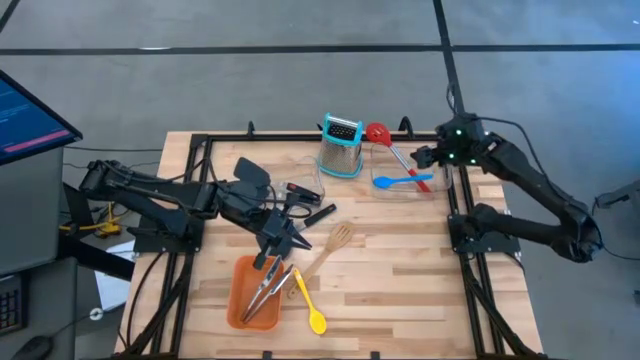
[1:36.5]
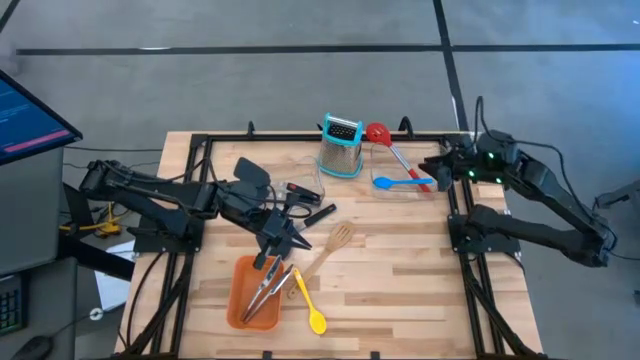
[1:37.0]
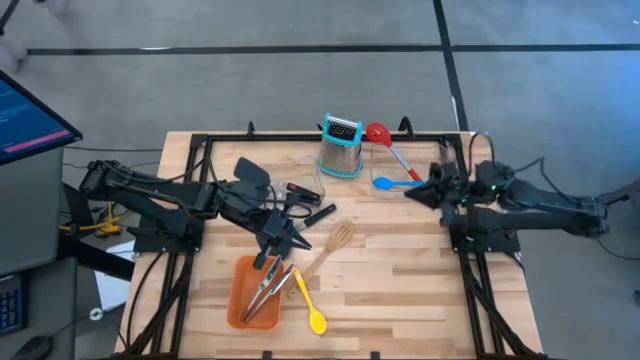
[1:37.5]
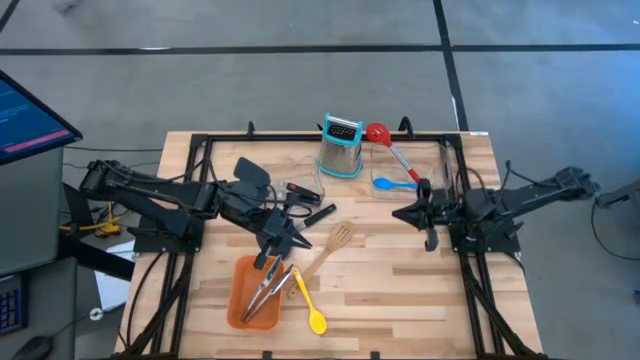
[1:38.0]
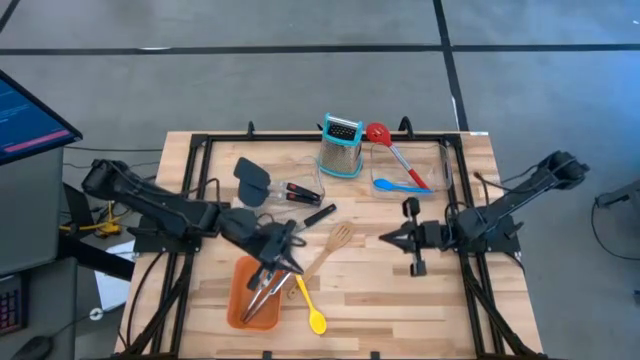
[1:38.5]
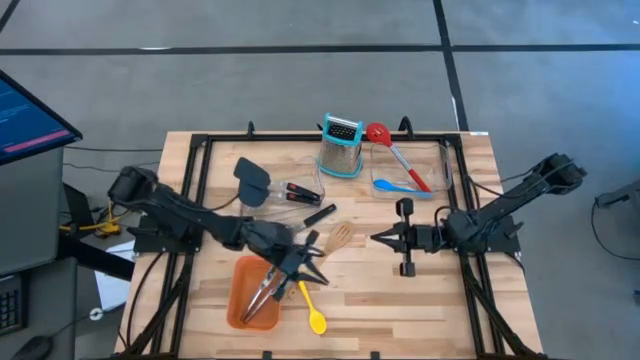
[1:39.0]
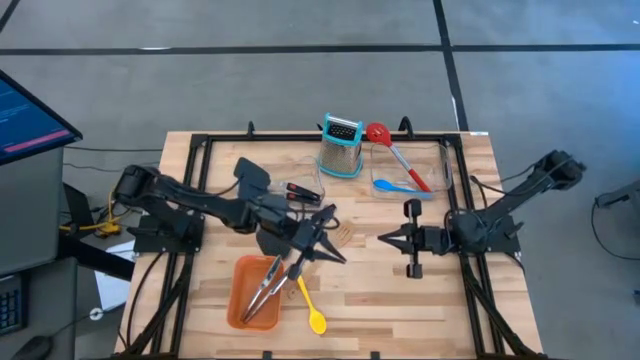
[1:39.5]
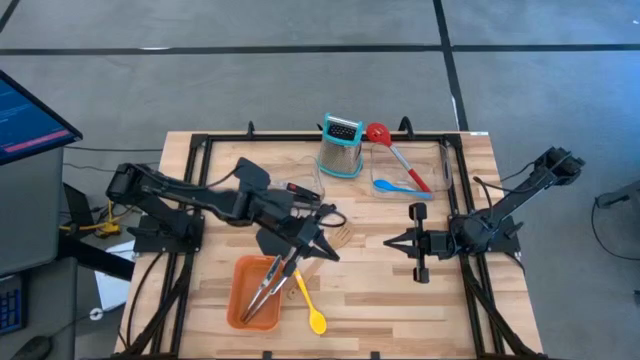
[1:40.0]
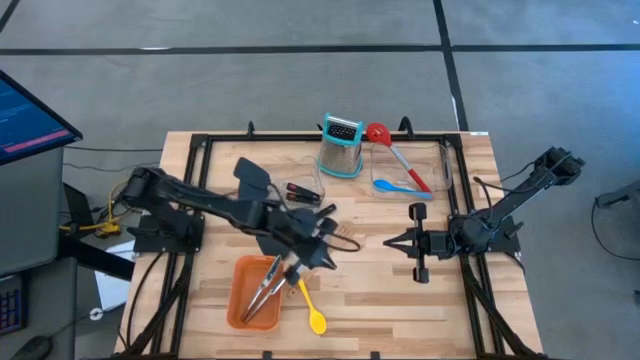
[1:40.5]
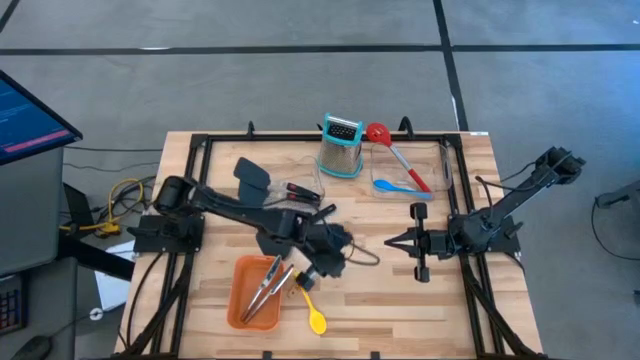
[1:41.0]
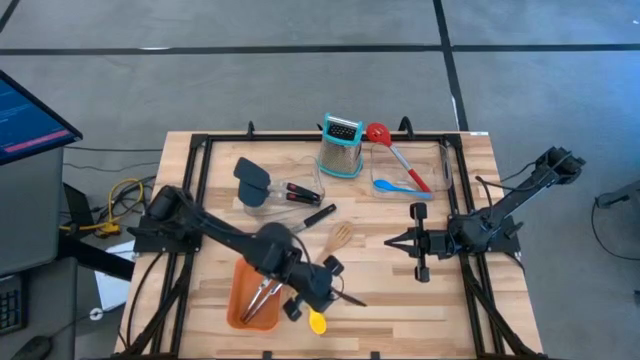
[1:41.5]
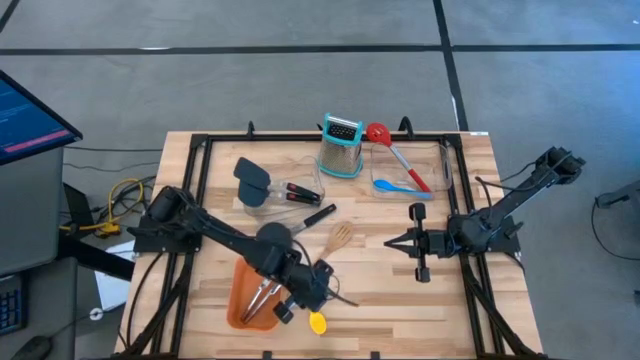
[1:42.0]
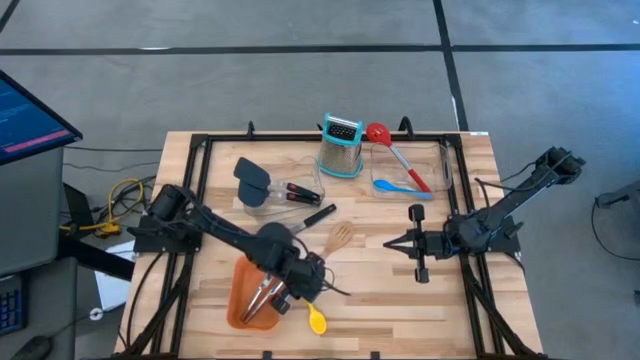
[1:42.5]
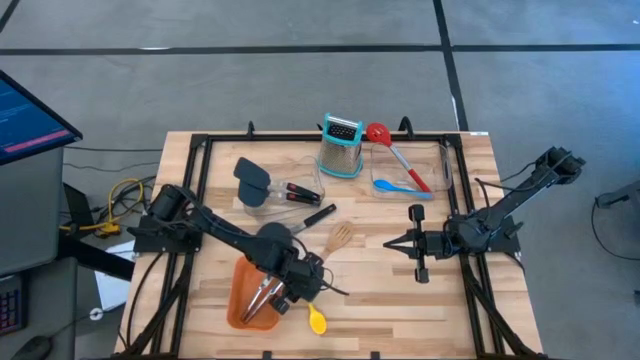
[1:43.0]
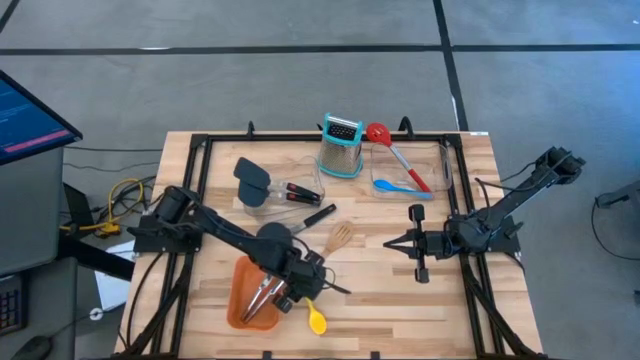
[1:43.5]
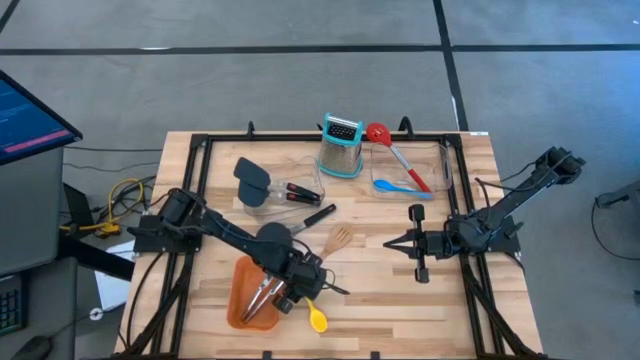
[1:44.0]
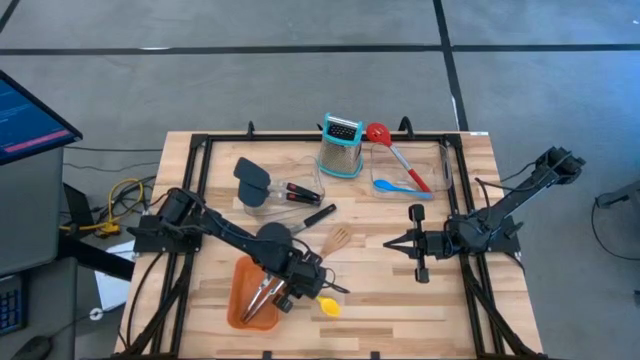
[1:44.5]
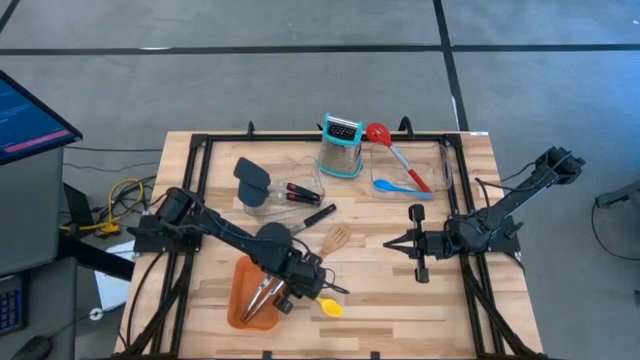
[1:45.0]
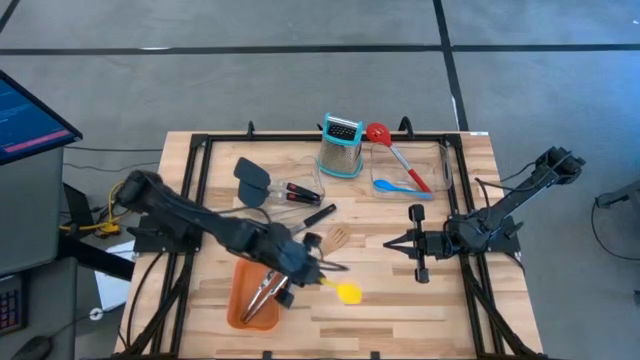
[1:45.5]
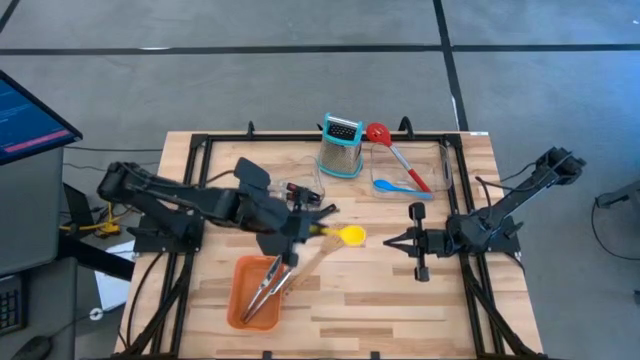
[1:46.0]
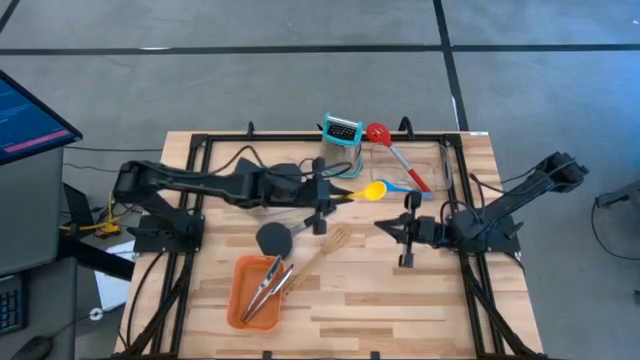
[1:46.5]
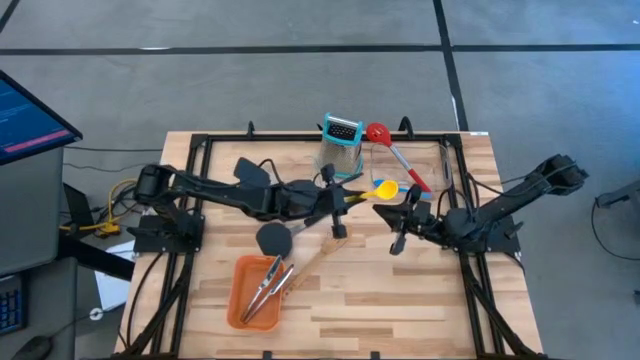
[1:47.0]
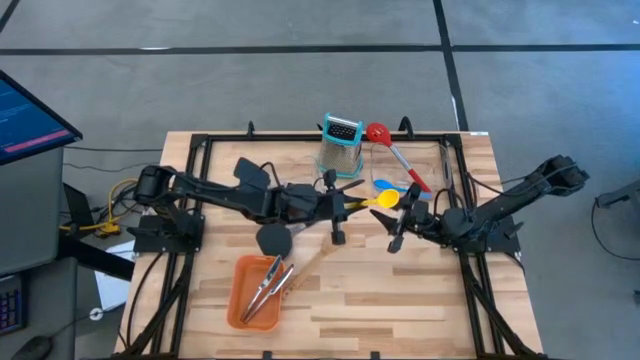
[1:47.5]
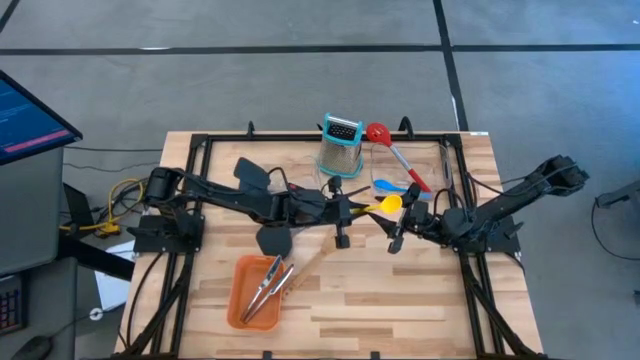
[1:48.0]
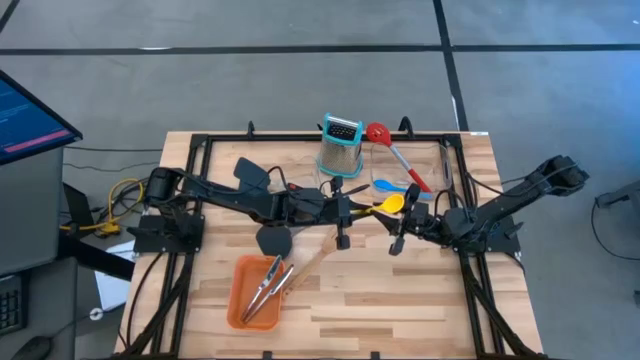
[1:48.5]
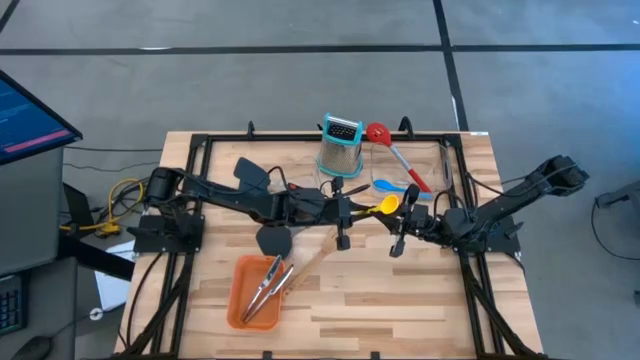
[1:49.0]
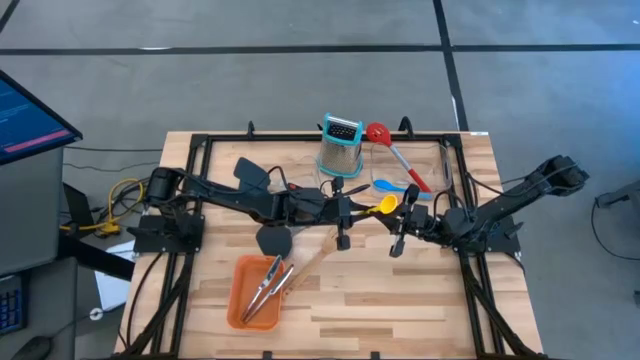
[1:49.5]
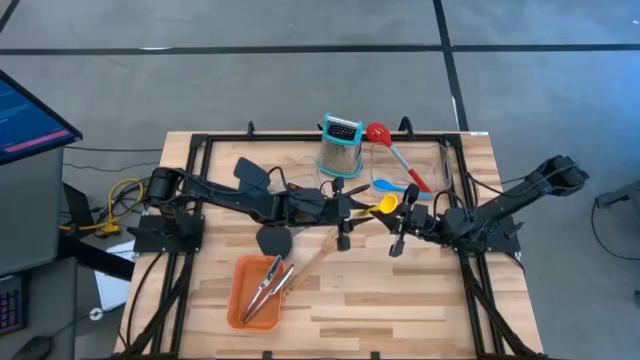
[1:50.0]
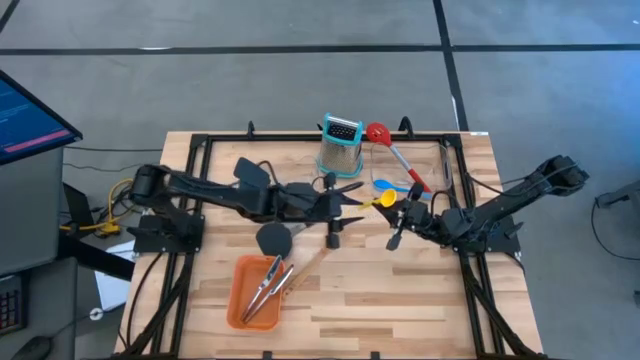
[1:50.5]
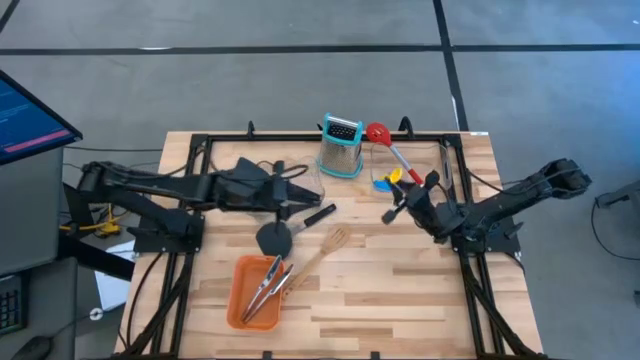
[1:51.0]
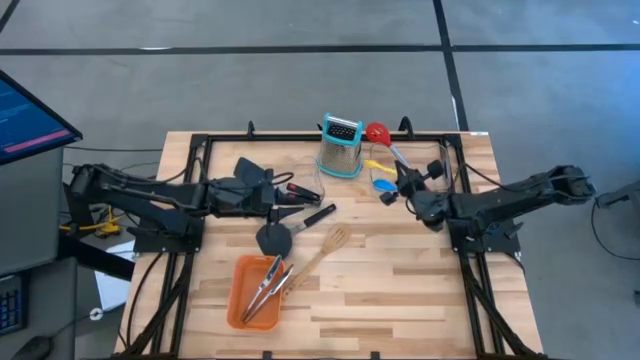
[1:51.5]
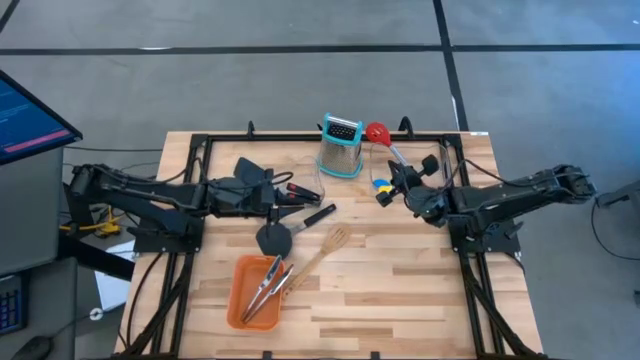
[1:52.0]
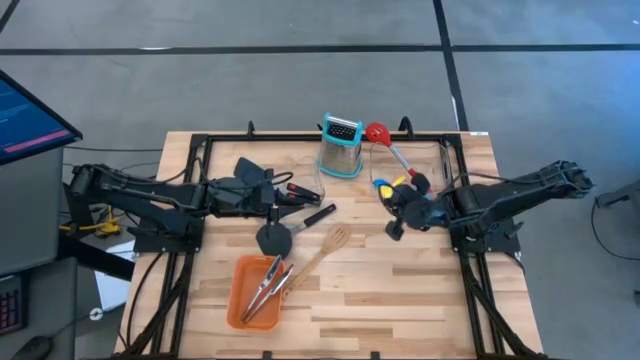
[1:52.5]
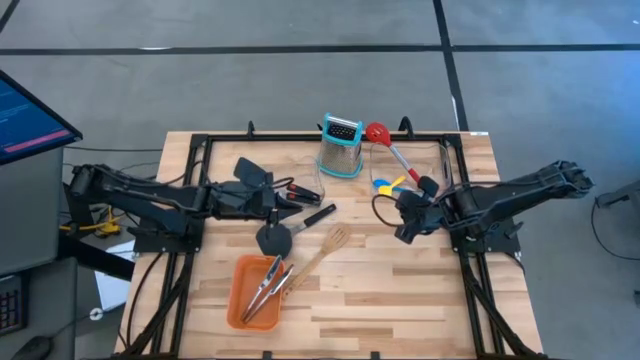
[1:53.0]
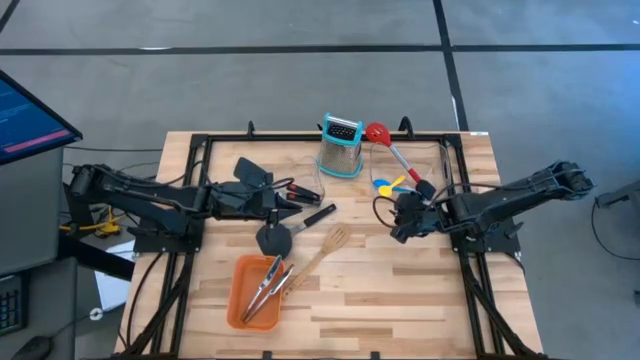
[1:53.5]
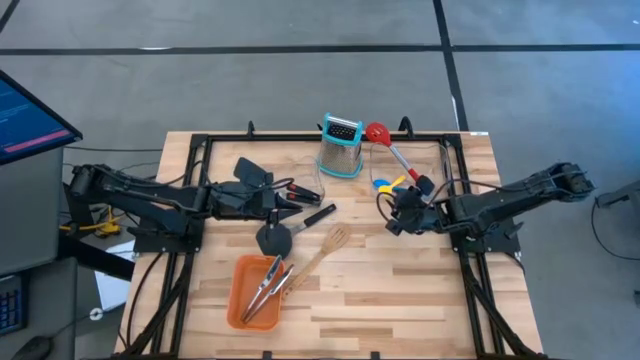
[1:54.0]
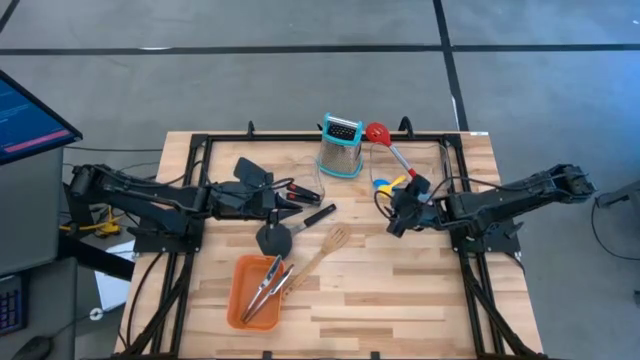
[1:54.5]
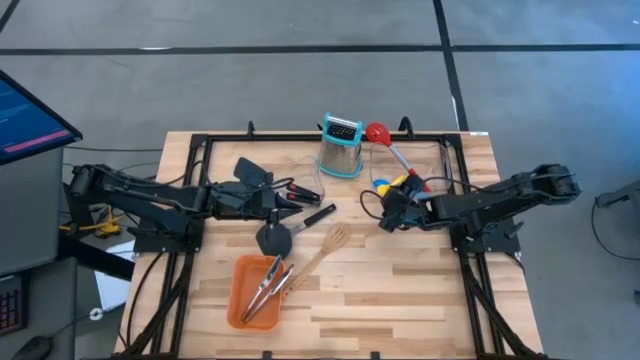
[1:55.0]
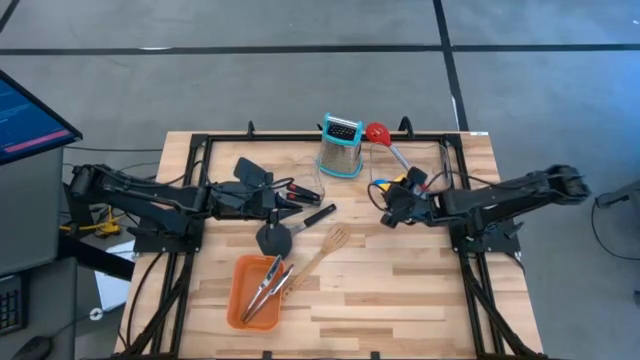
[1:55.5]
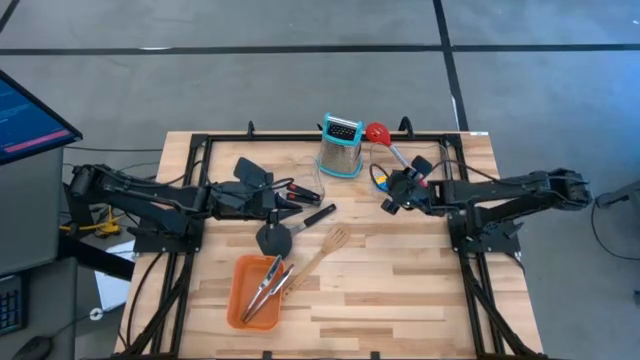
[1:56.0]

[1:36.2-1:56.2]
Task: Pick & Place Kitchen Items
Put the yellow serving spoon into the right transparent bin
